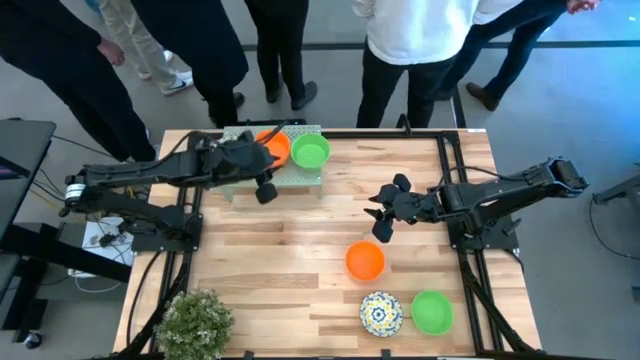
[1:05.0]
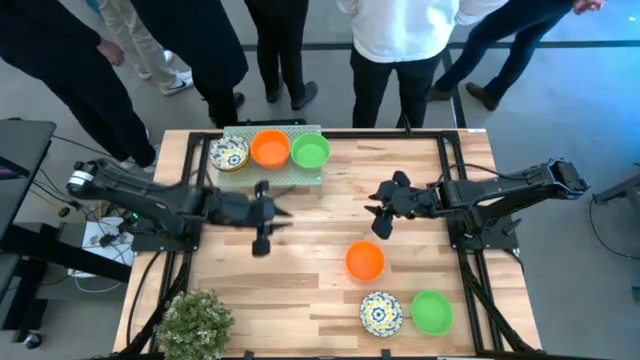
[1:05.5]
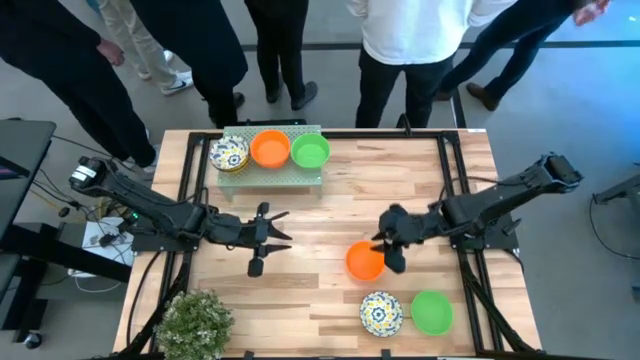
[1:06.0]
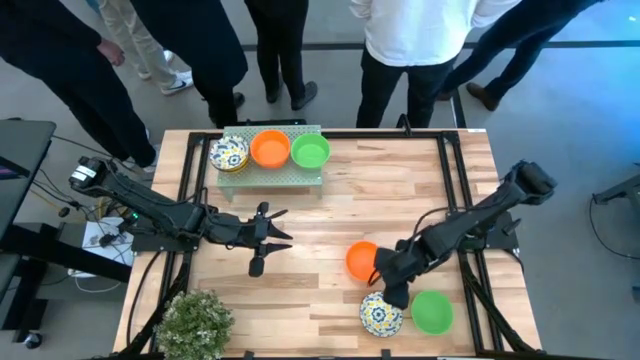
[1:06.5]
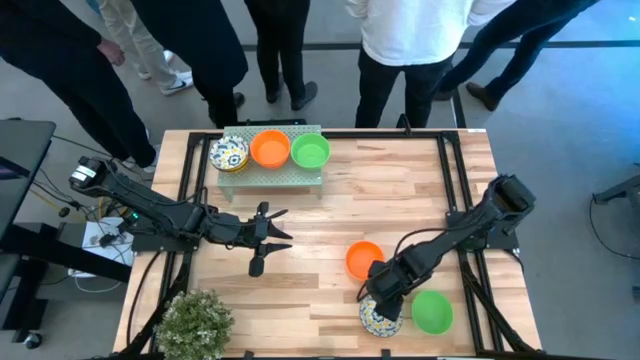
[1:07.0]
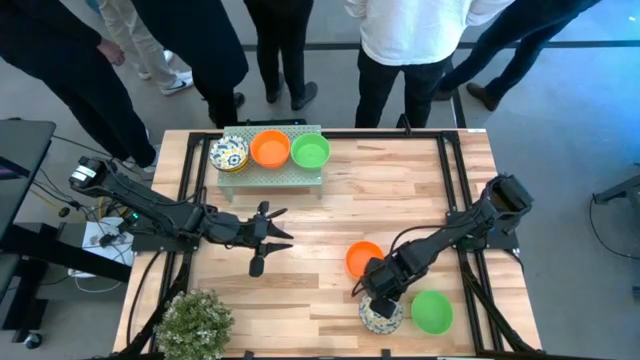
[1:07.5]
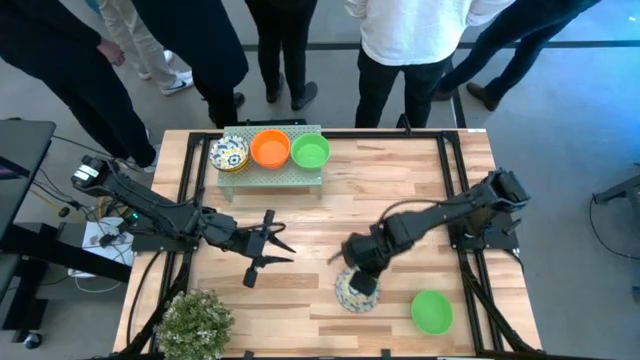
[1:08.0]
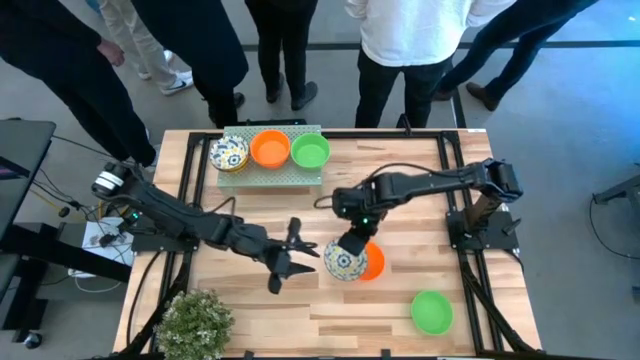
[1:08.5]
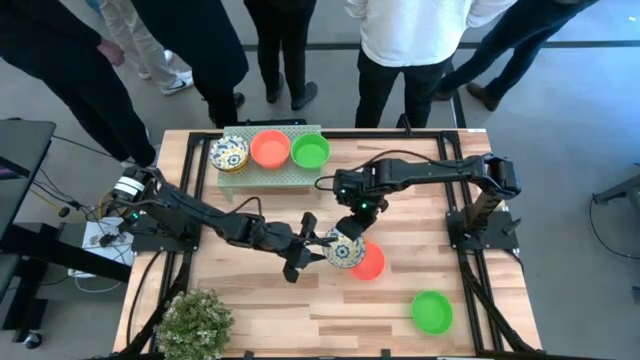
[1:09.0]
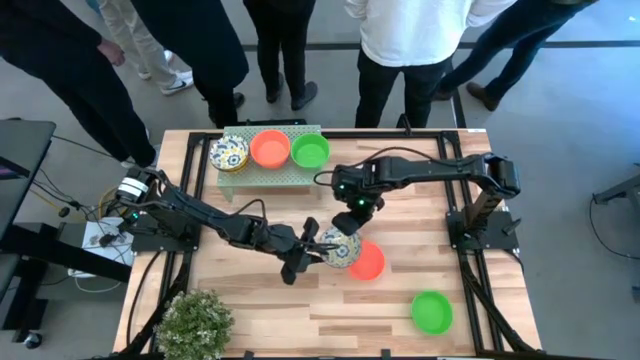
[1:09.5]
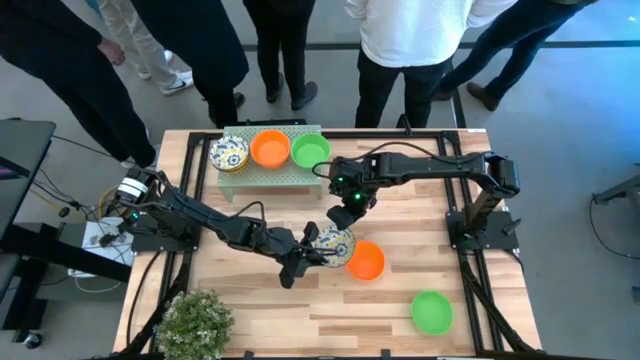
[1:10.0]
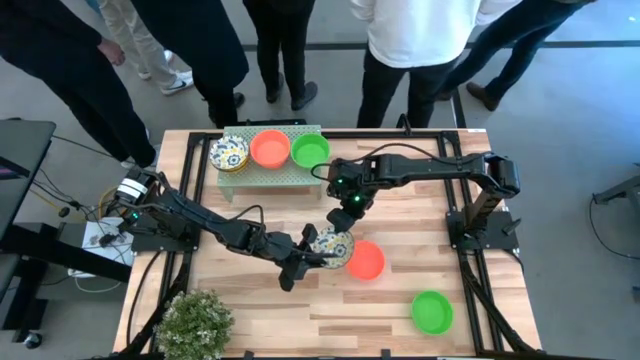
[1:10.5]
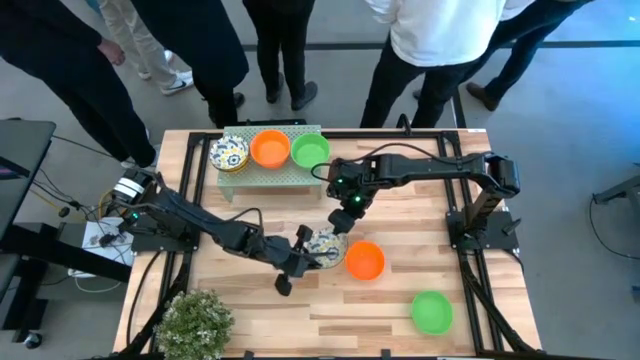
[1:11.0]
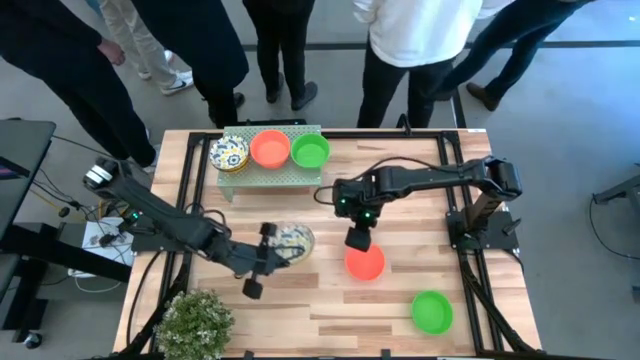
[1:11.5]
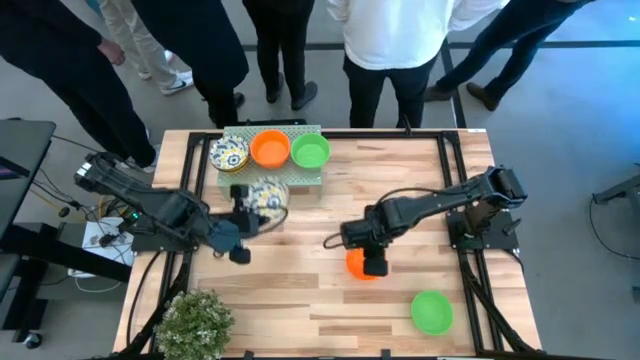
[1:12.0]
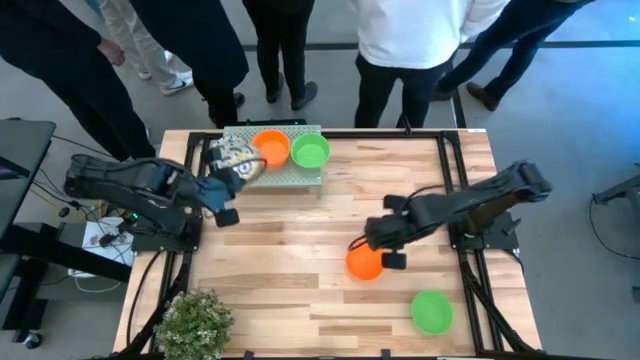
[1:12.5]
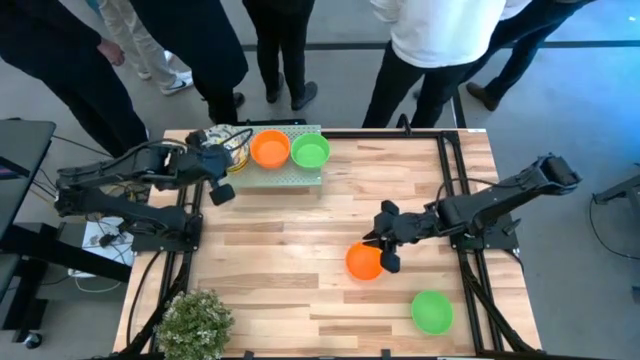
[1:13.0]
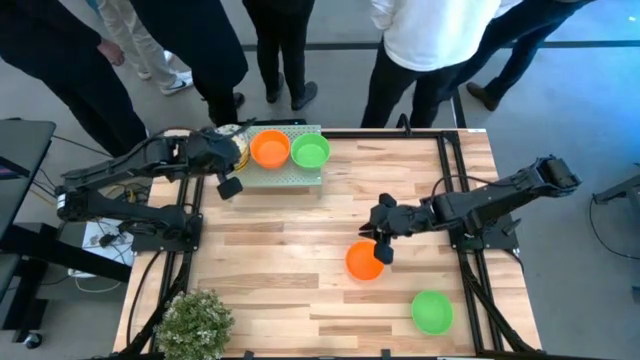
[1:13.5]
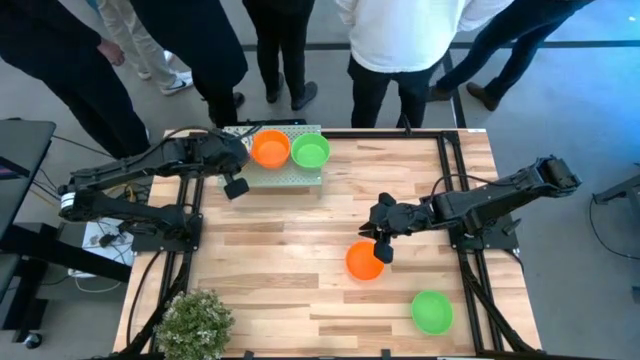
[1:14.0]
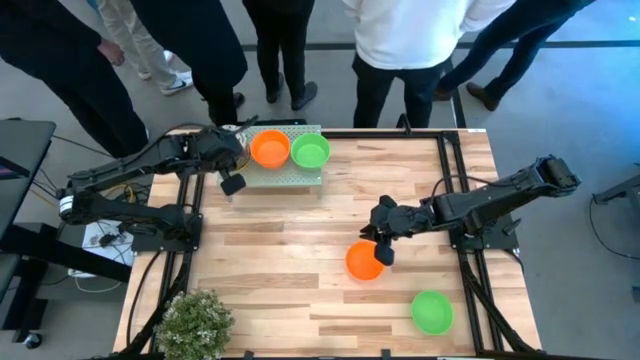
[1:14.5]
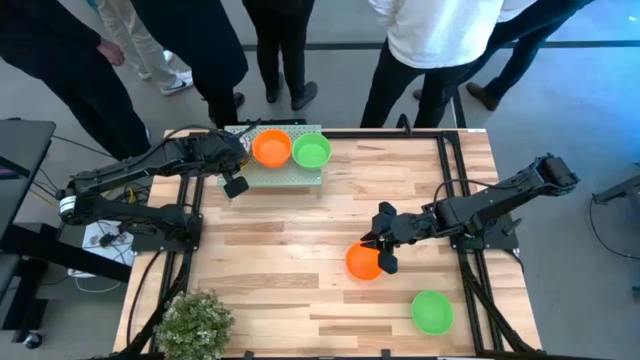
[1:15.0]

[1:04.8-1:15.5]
Task: Pick & Place Mini bowls
Stack the white patterned bowl on top of the other white patterned bowl on the shelf

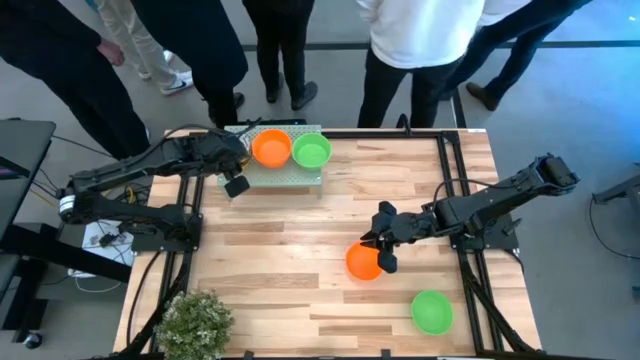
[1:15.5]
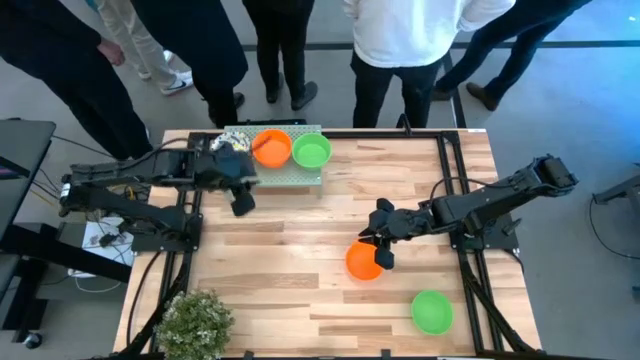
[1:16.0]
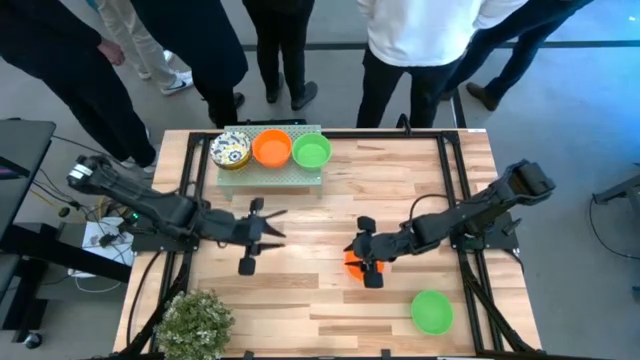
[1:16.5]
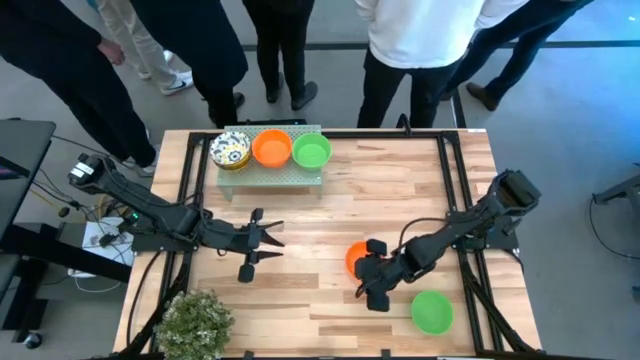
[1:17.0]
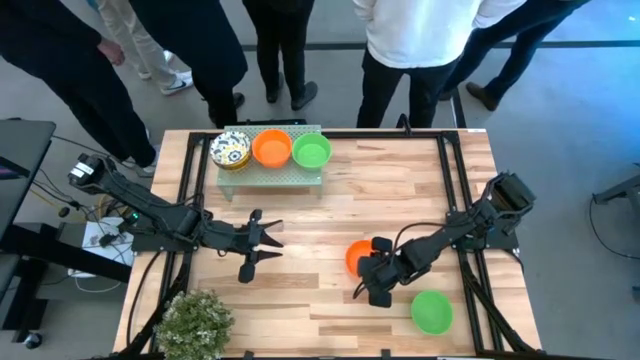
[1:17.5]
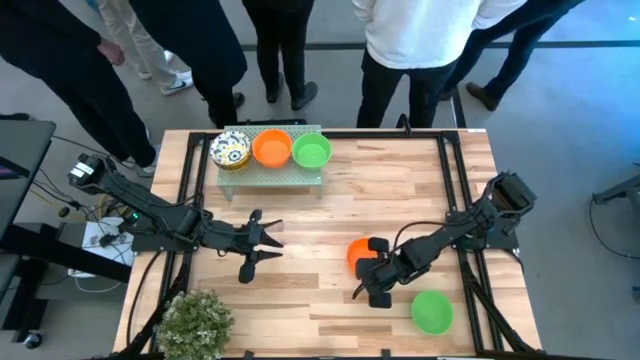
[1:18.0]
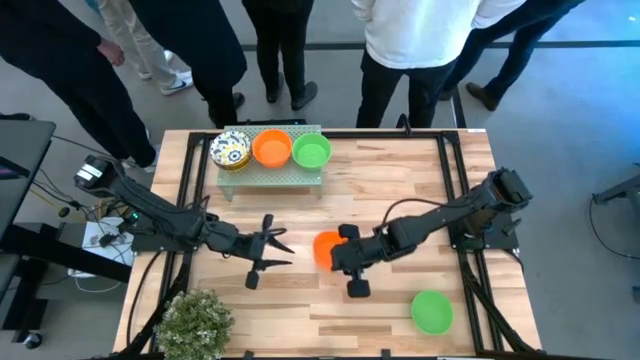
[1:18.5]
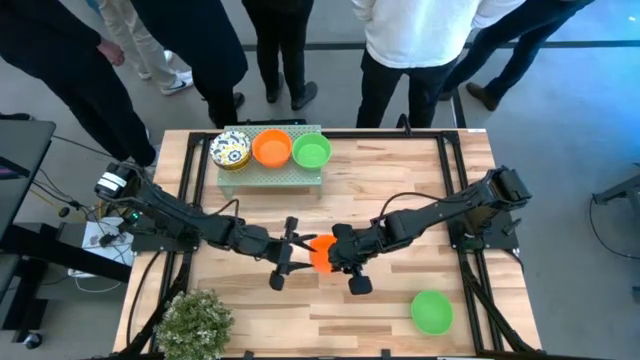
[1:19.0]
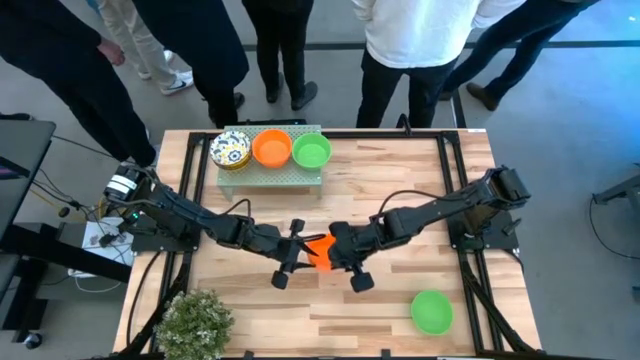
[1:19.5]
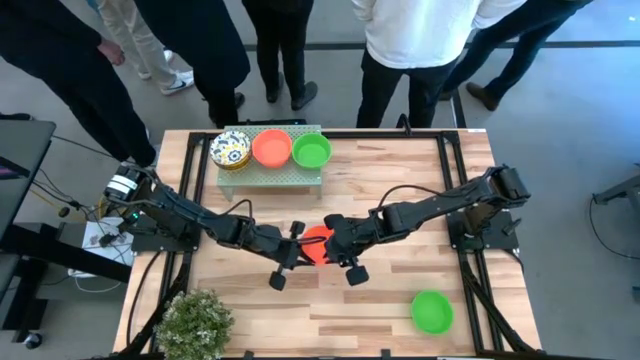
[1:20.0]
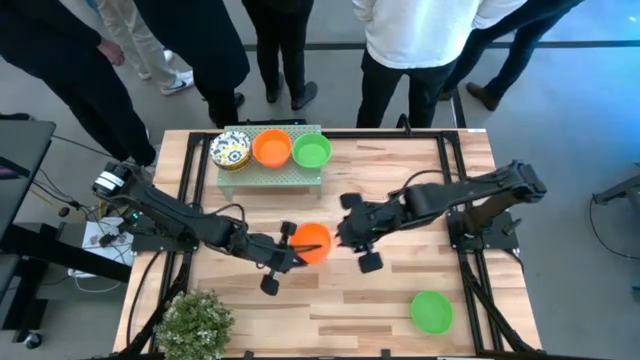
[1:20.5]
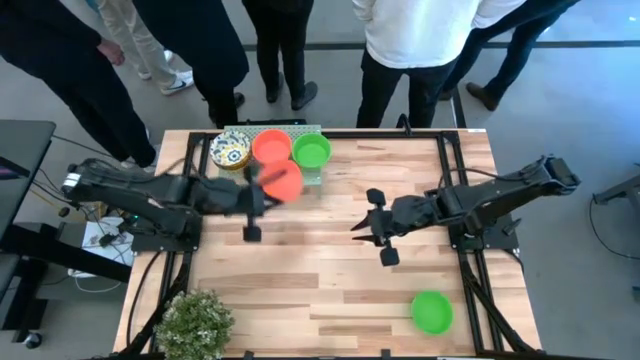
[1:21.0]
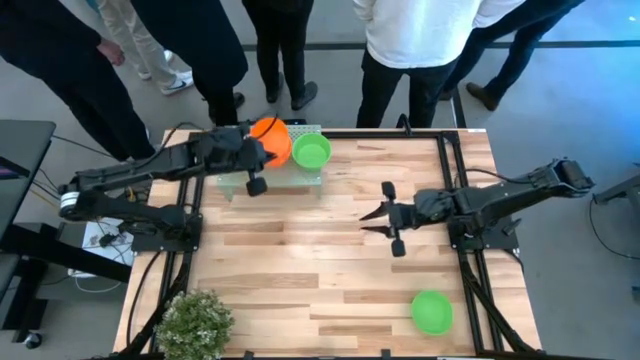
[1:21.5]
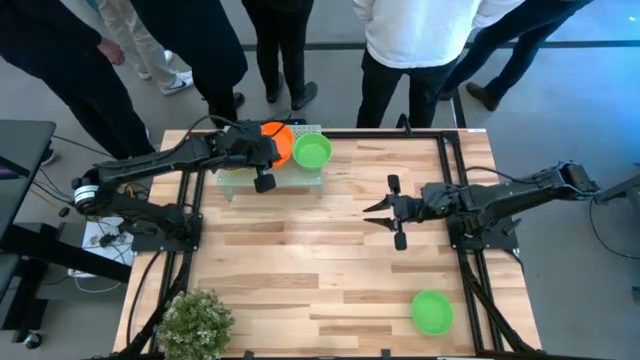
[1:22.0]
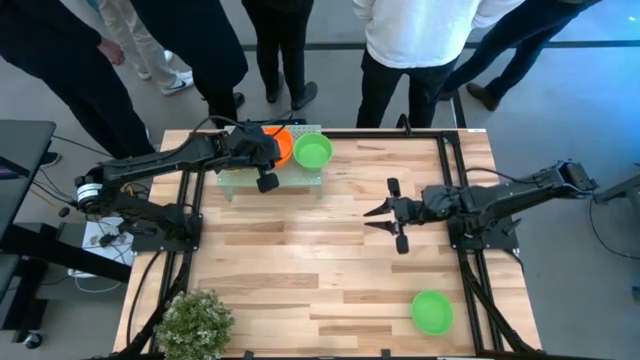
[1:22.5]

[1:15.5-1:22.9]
Stack the orange bowl on top of the other orange bowl on the shelf

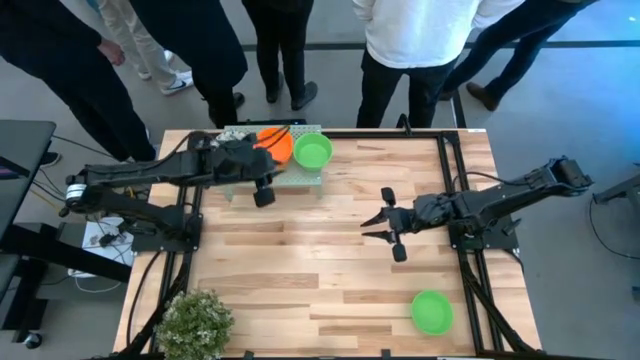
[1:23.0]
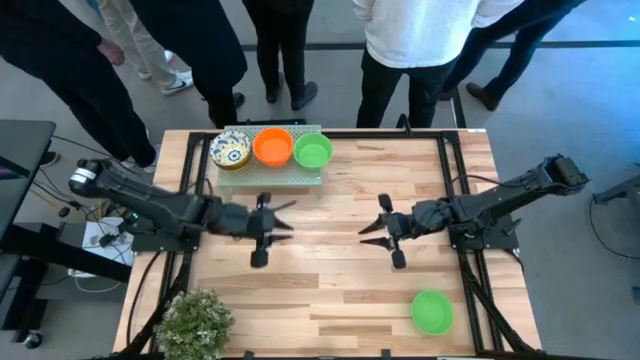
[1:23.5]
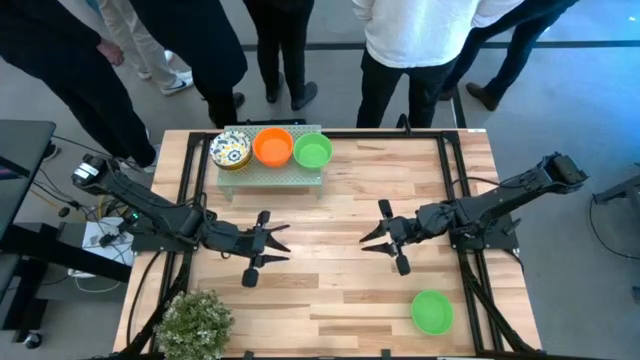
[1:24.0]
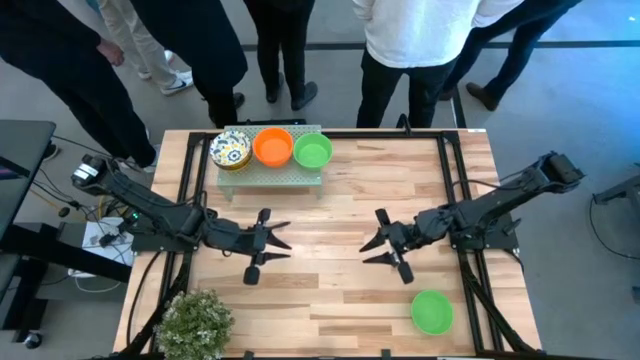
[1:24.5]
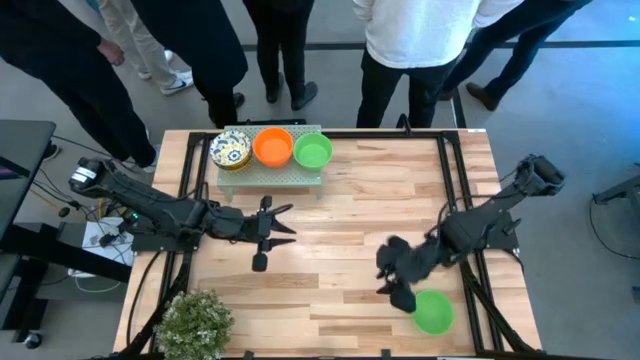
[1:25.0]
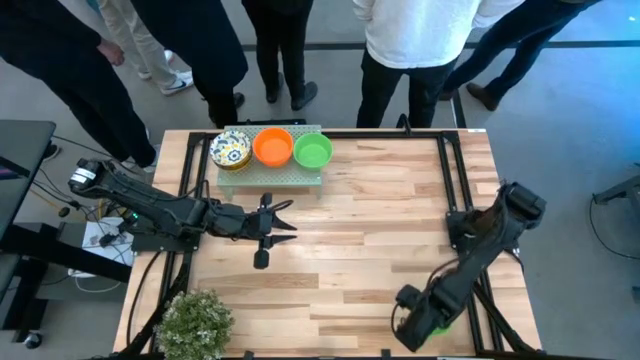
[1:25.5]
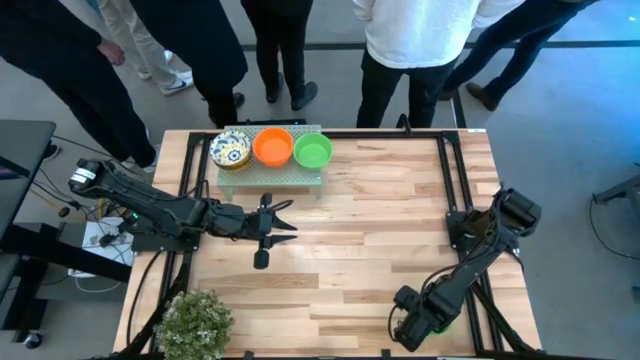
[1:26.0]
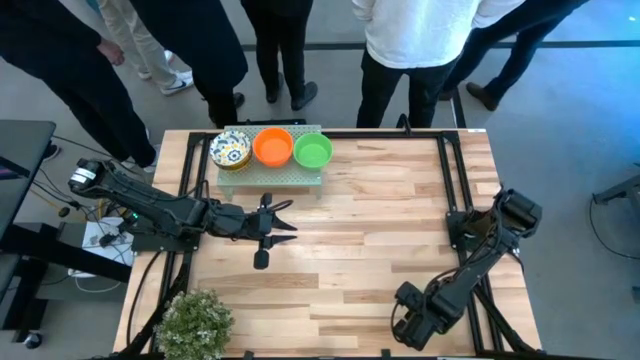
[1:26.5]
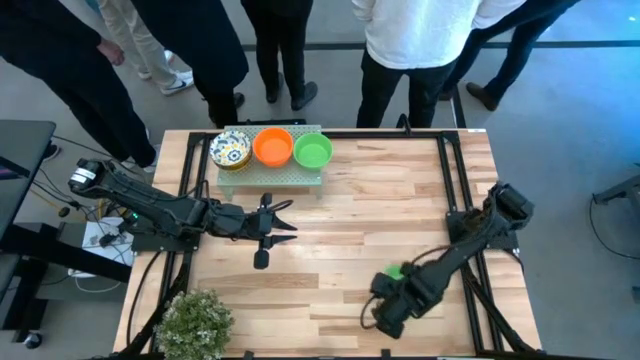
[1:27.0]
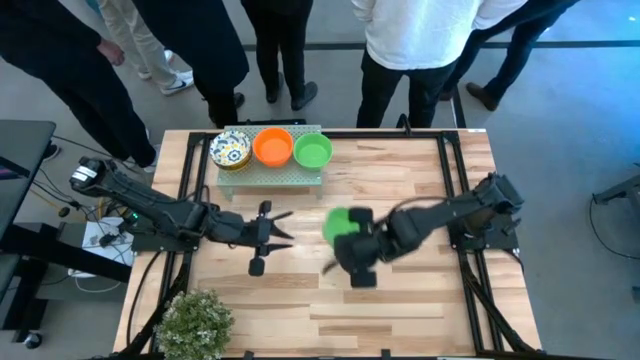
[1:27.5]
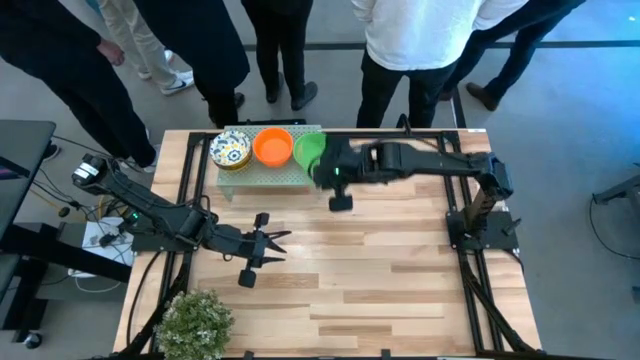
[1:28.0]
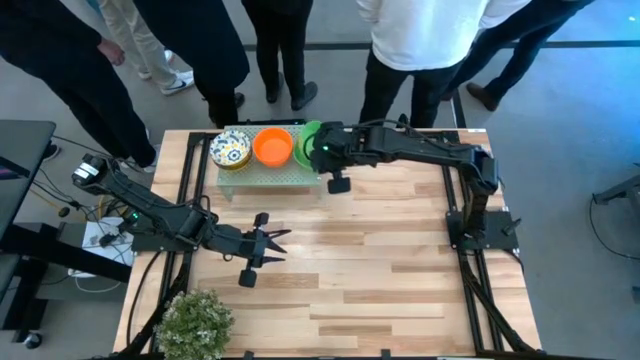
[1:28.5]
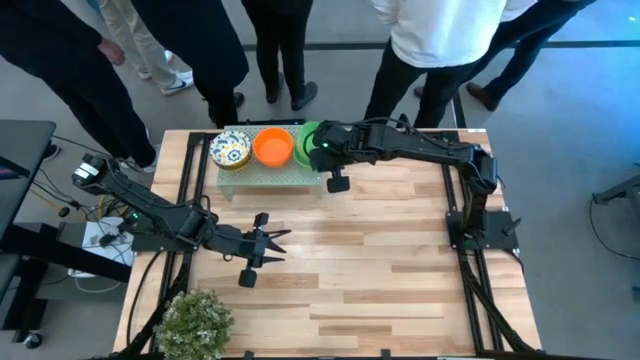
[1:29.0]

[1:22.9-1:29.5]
Stack the green bowl on top of the other green bowl on the shelf
